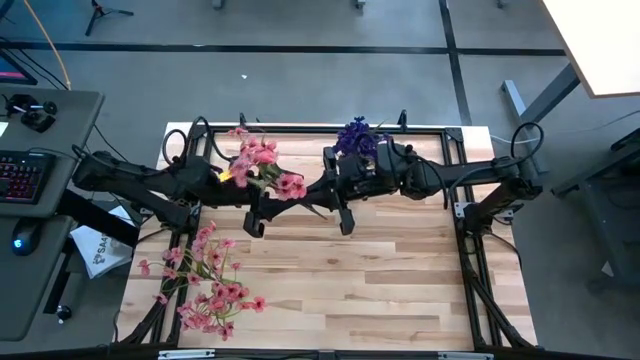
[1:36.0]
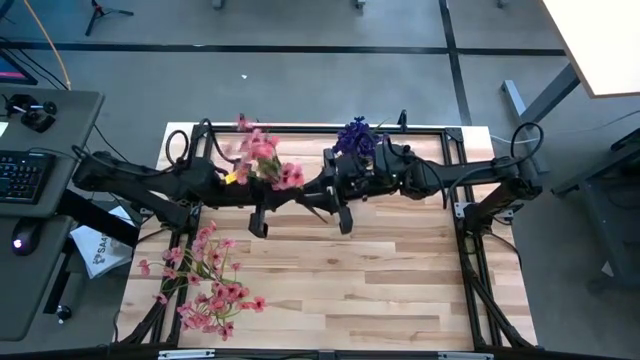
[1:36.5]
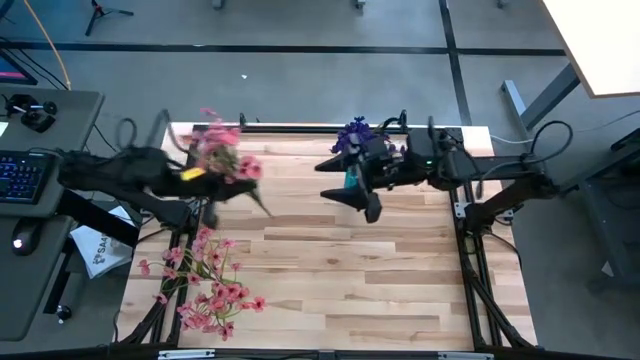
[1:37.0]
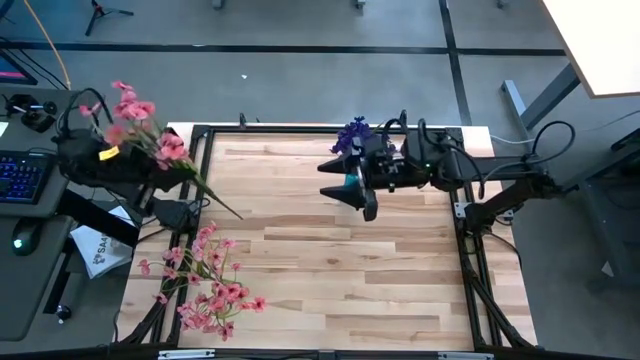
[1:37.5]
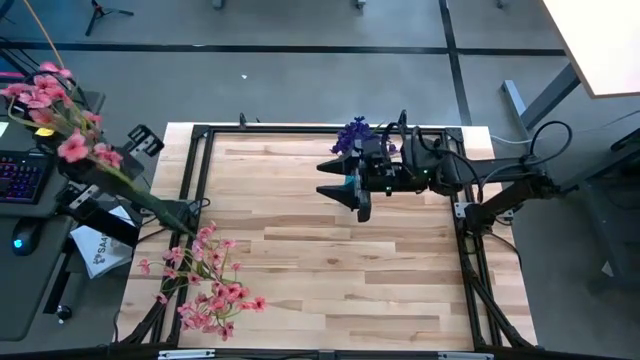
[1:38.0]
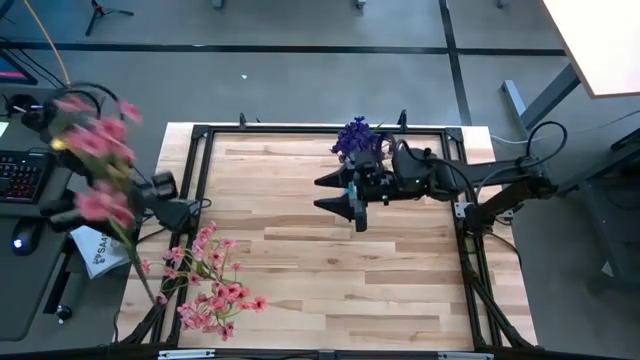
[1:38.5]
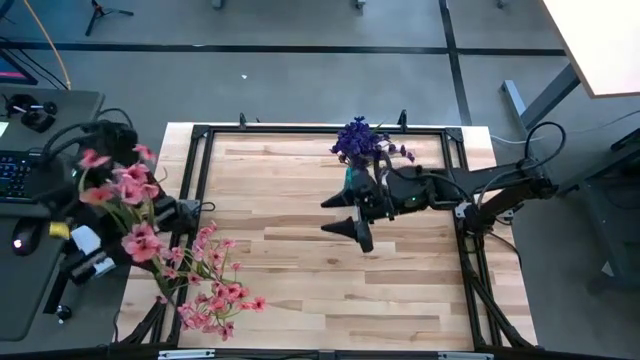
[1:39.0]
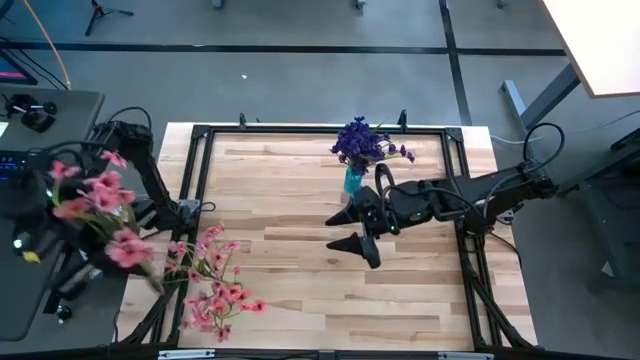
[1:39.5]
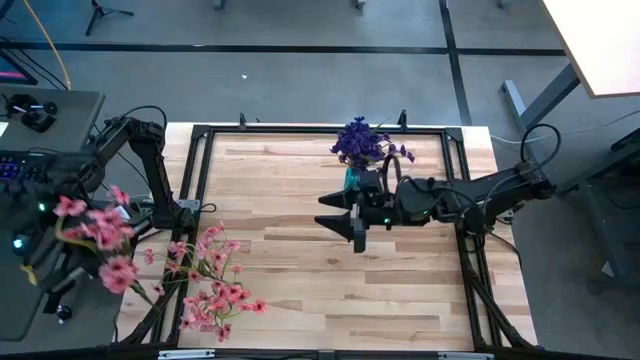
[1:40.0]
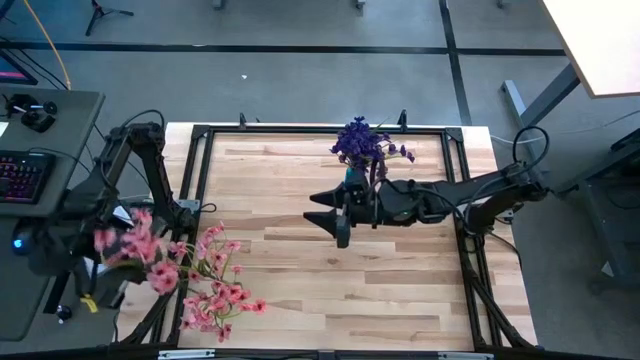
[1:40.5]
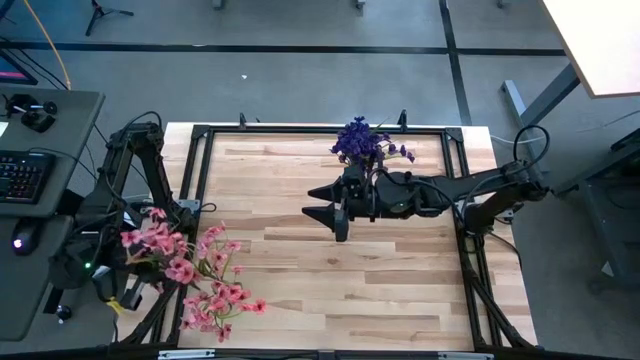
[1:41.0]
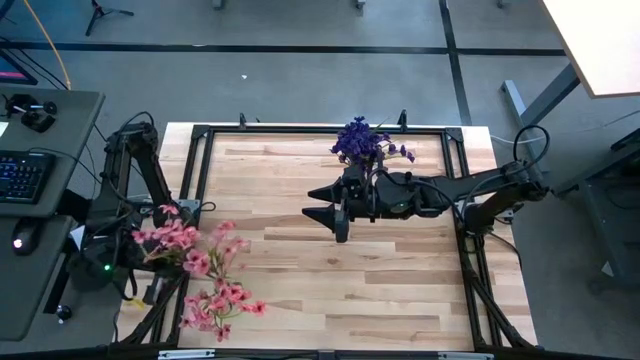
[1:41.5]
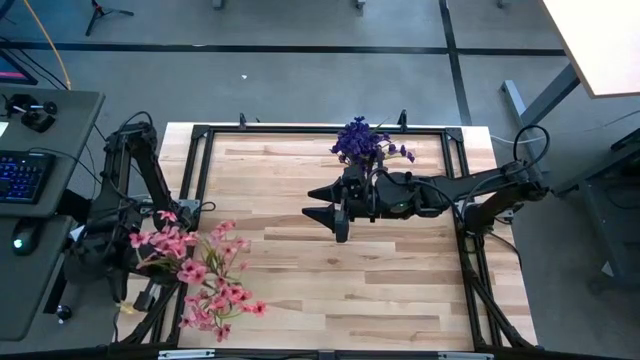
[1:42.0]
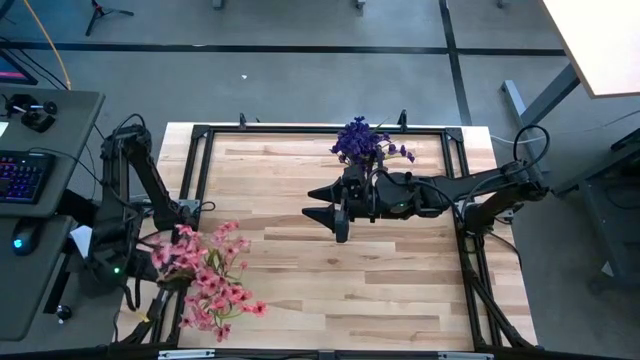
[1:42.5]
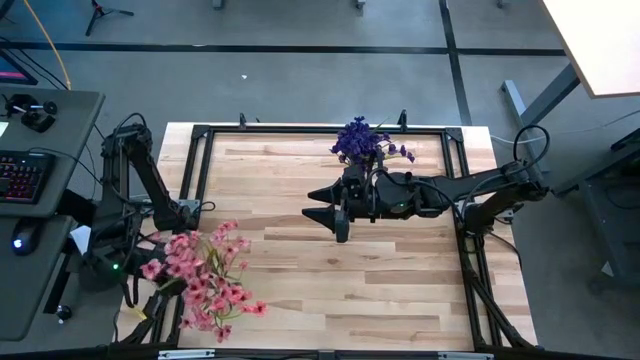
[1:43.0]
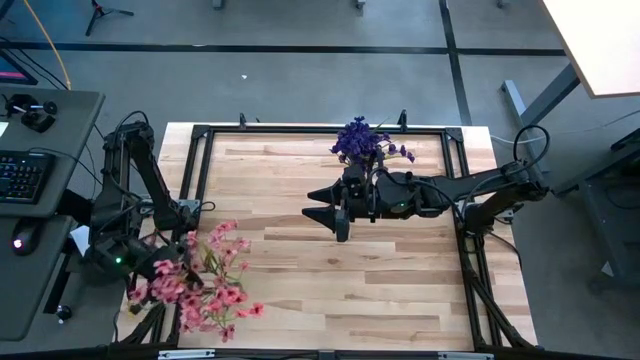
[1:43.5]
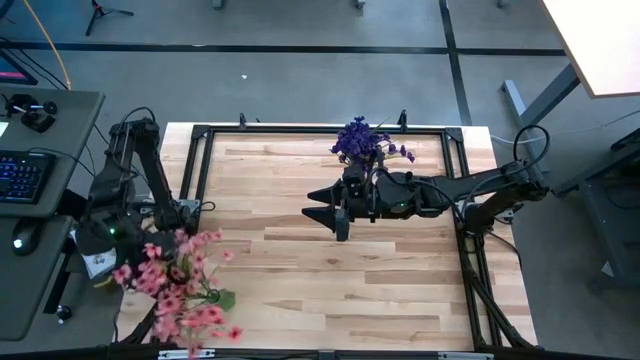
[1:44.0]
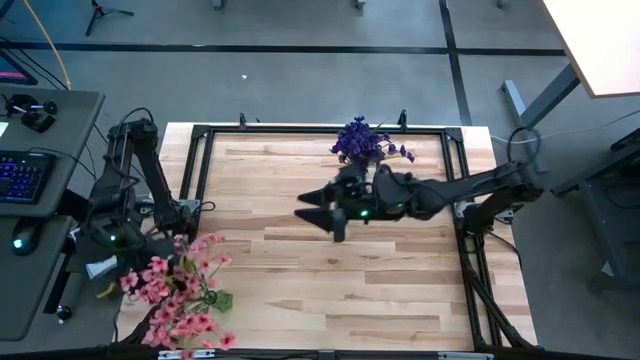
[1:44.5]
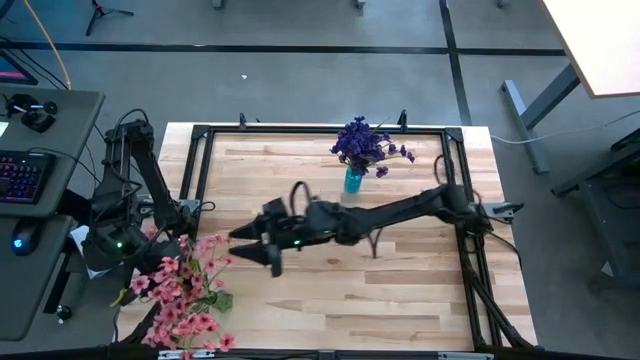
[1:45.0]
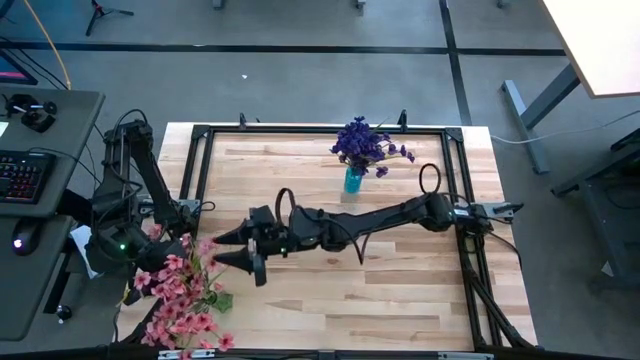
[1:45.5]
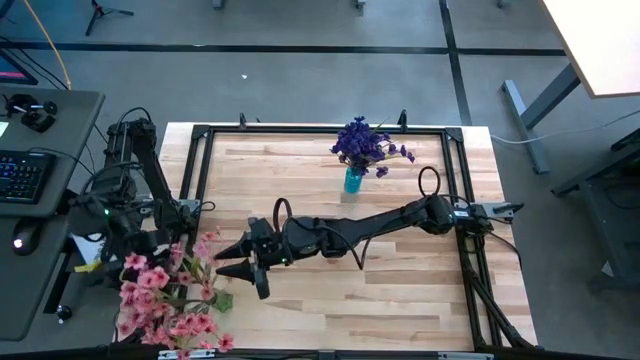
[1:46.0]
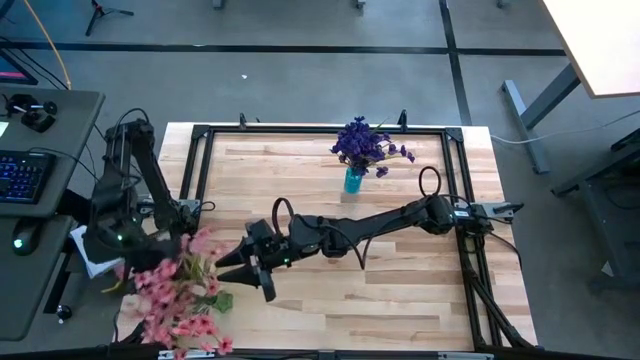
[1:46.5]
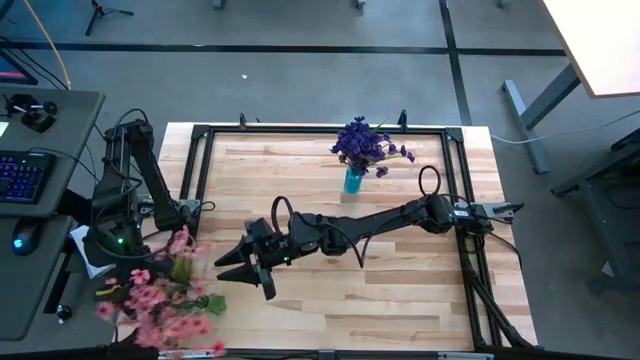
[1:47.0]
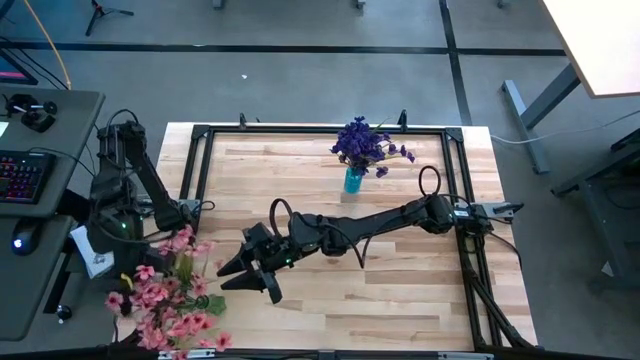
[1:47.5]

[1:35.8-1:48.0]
Task: Sort flowers into vase by color
Put the pink flowers into the green vase

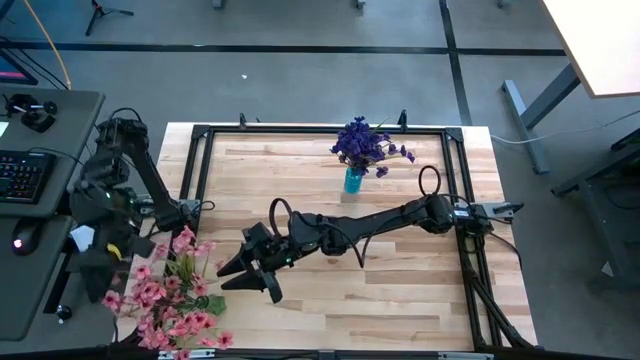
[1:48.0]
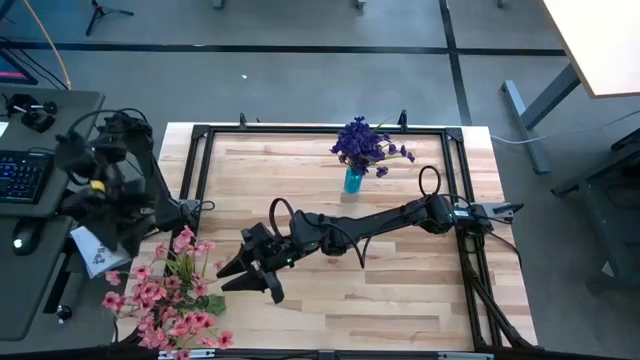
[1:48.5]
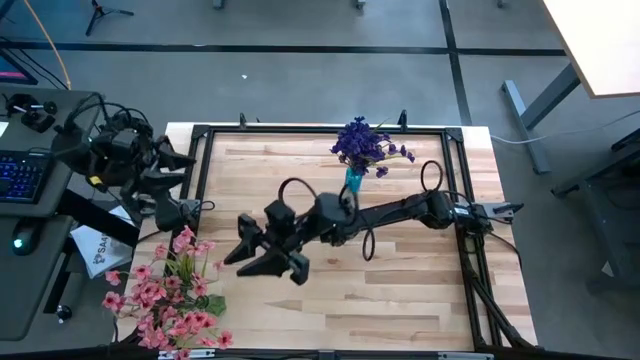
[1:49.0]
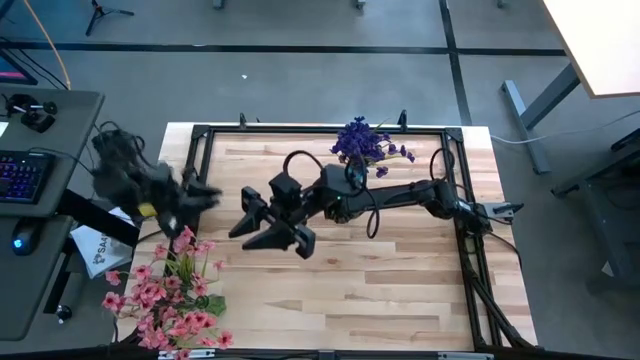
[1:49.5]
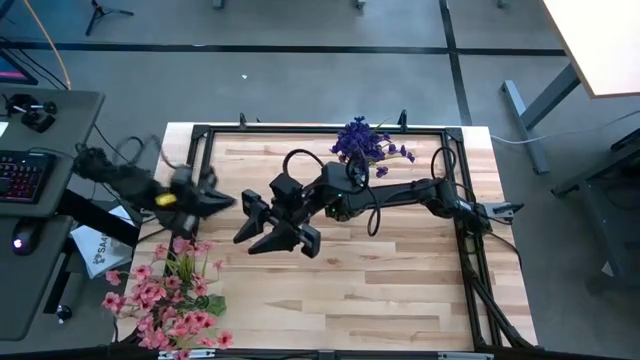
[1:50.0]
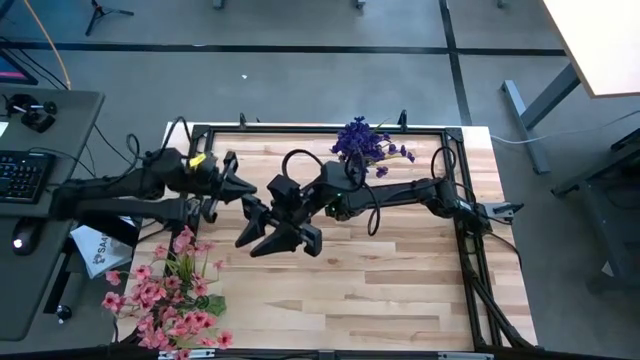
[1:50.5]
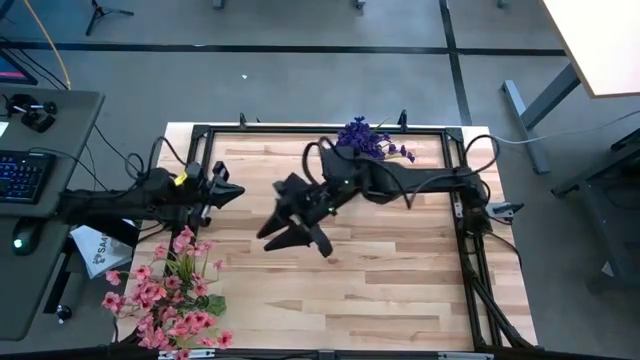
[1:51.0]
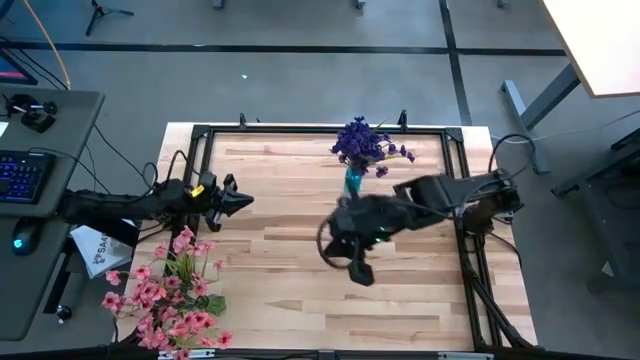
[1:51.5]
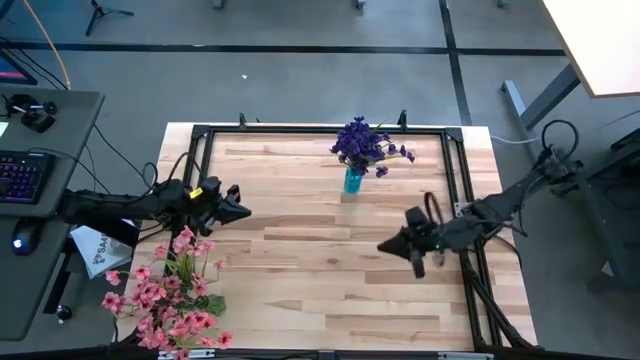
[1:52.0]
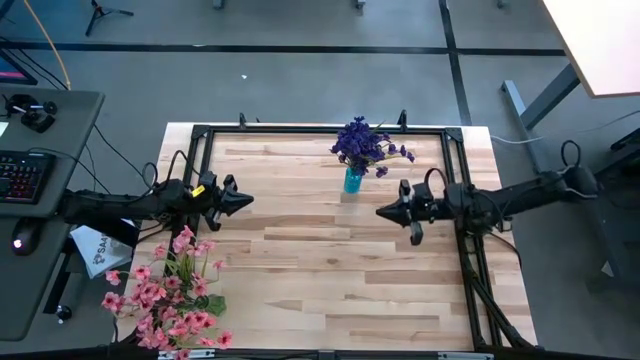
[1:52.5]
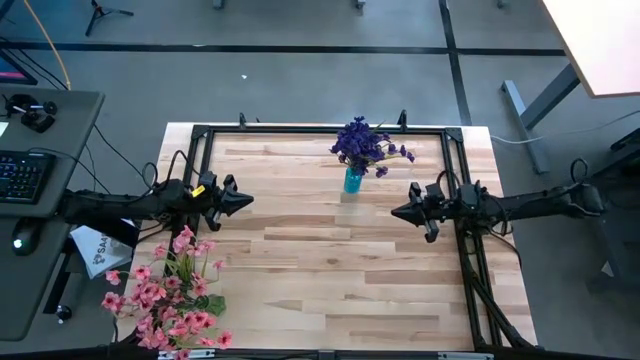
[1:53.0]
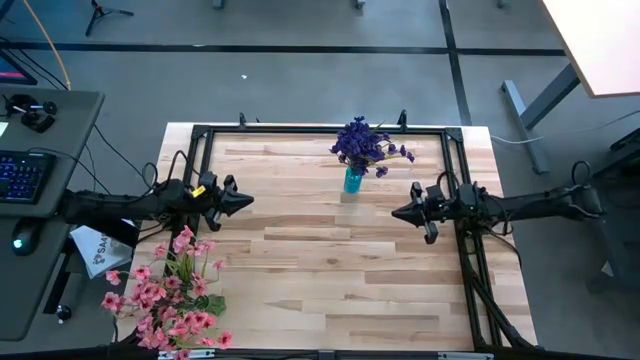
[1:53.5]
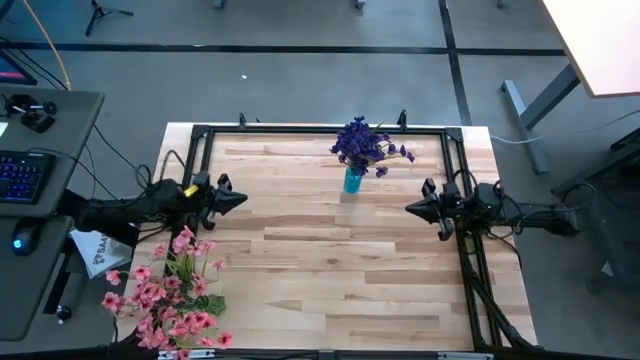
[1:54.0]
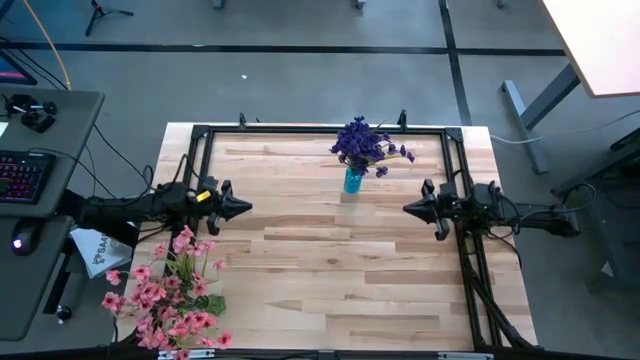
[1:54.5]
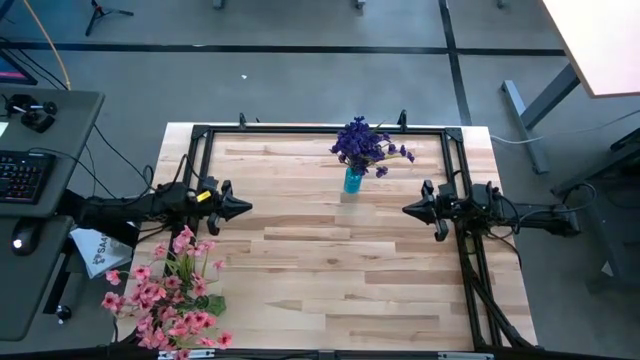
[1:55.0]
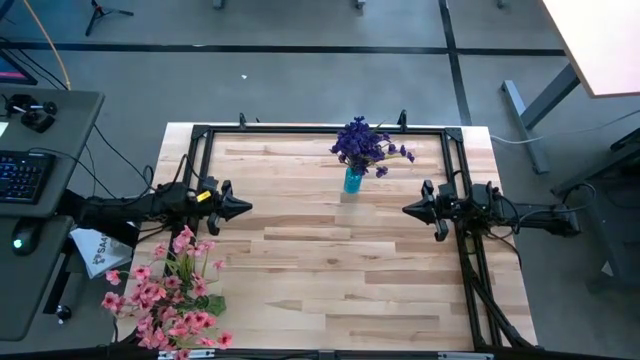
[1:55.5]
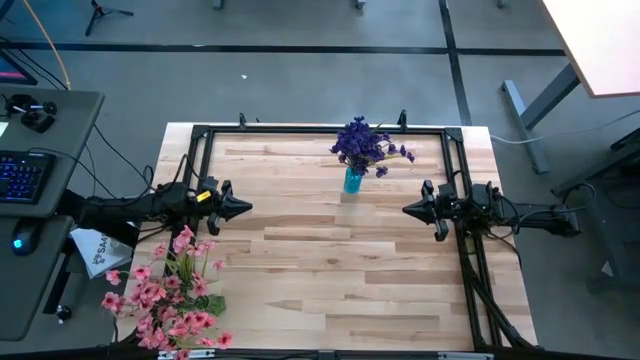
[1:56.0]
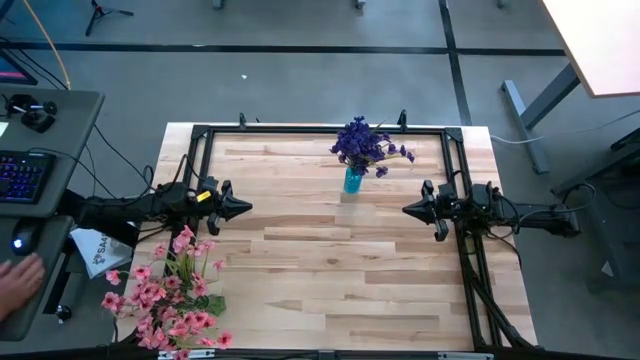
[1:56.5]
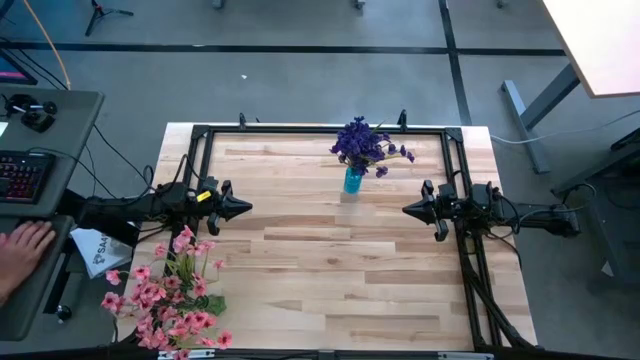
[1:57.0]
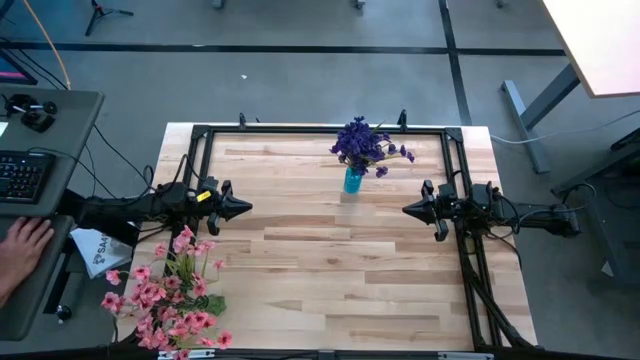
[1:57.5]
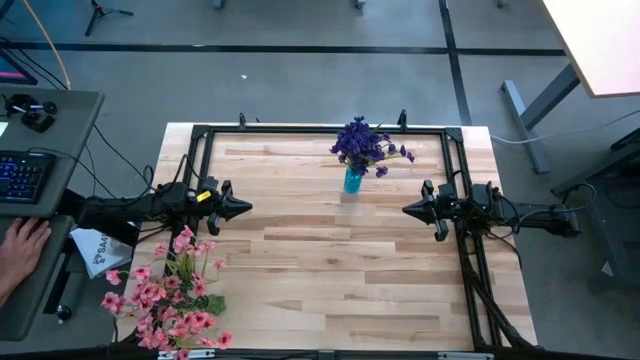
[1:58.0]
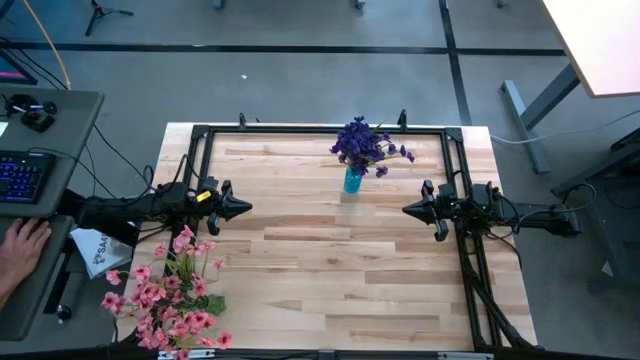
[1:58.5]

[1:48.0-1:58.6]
Return to Home Position
